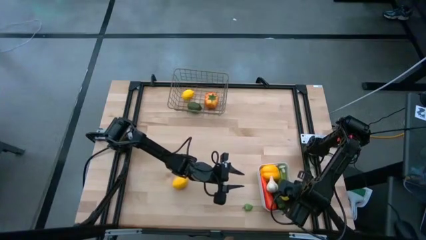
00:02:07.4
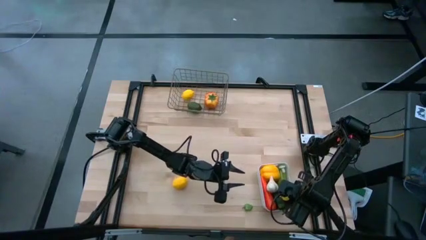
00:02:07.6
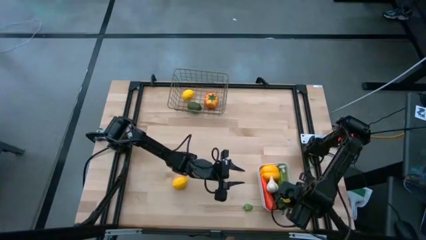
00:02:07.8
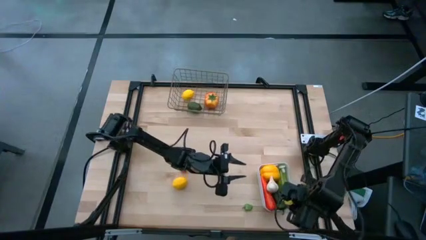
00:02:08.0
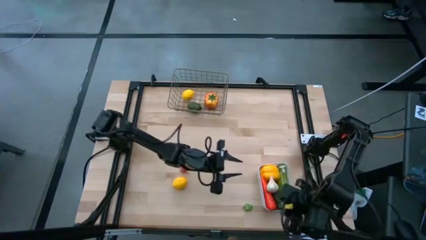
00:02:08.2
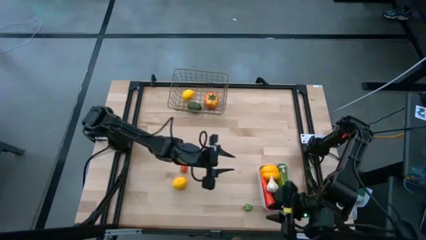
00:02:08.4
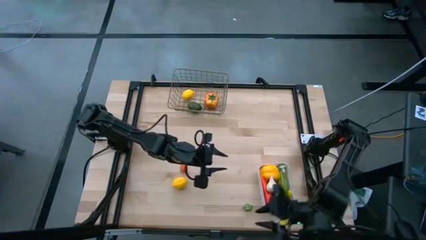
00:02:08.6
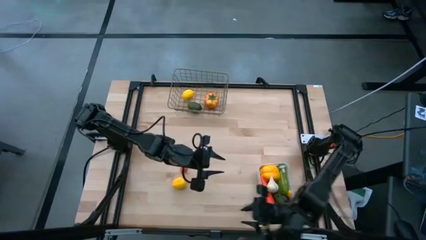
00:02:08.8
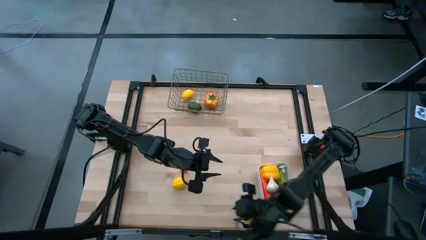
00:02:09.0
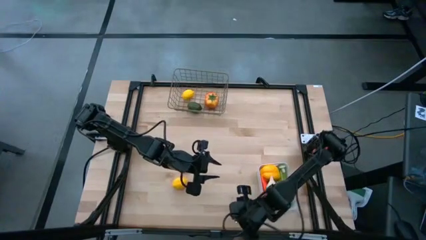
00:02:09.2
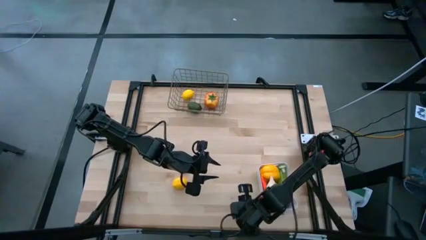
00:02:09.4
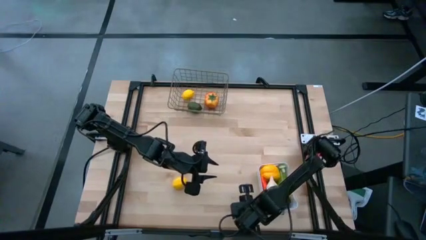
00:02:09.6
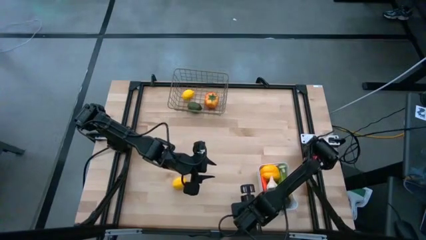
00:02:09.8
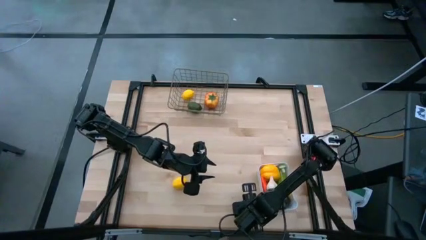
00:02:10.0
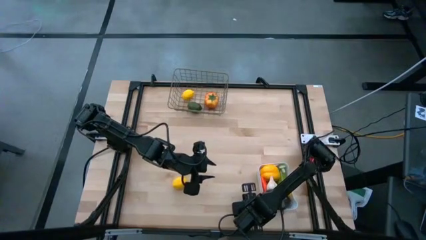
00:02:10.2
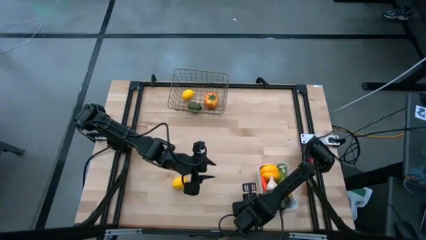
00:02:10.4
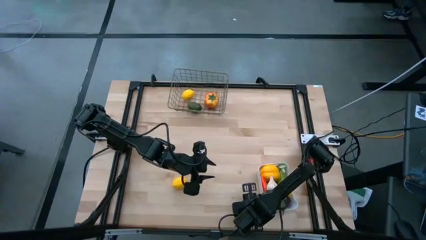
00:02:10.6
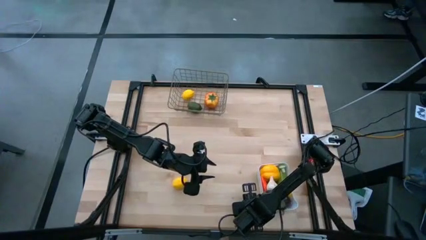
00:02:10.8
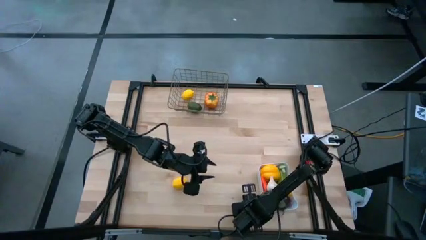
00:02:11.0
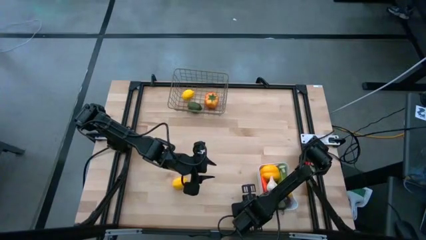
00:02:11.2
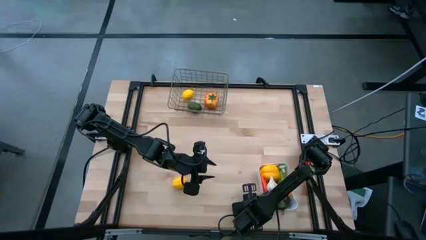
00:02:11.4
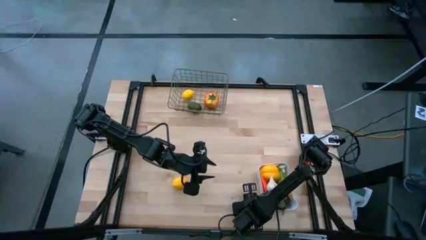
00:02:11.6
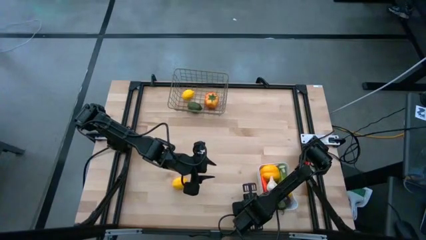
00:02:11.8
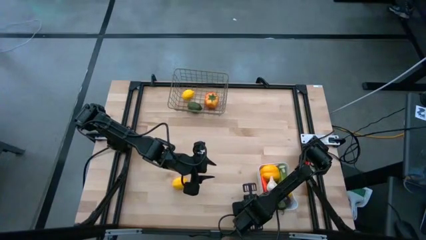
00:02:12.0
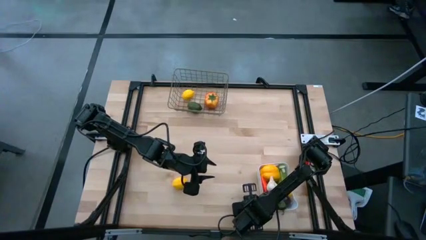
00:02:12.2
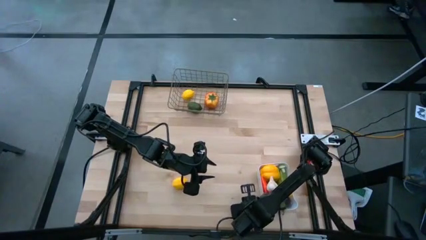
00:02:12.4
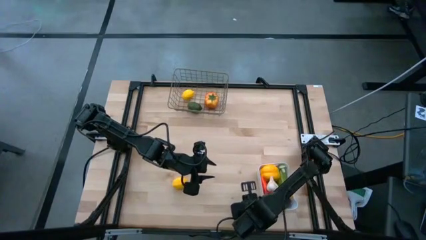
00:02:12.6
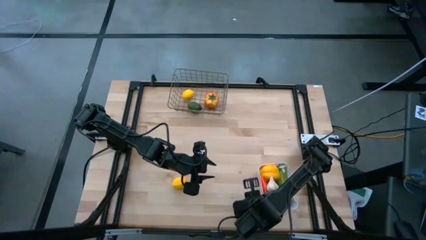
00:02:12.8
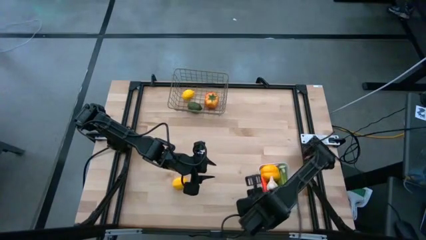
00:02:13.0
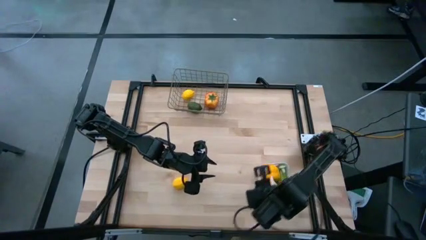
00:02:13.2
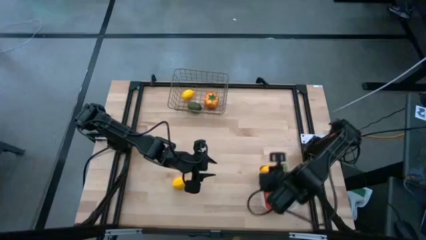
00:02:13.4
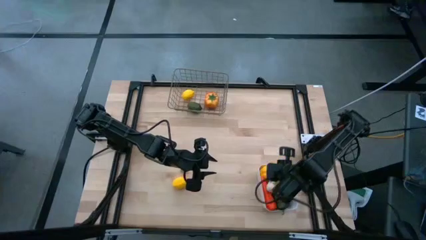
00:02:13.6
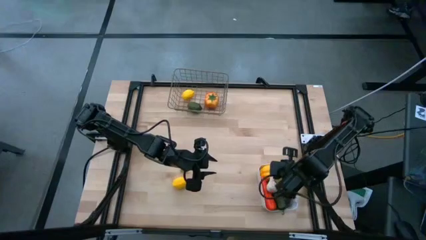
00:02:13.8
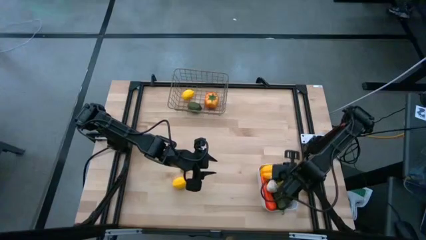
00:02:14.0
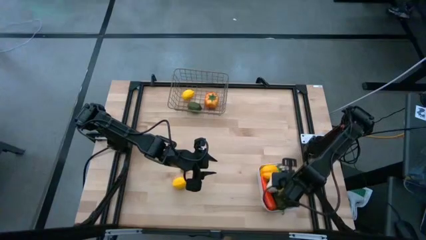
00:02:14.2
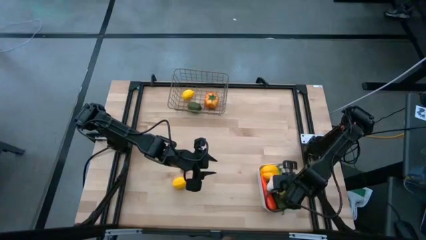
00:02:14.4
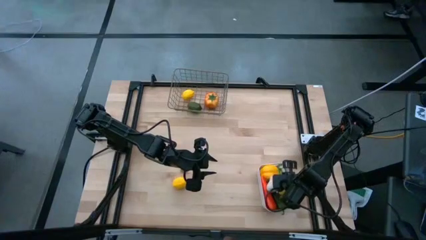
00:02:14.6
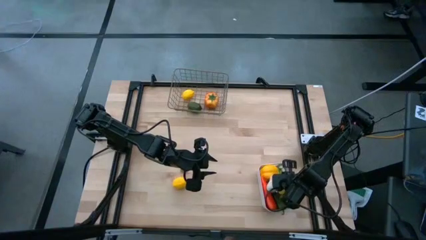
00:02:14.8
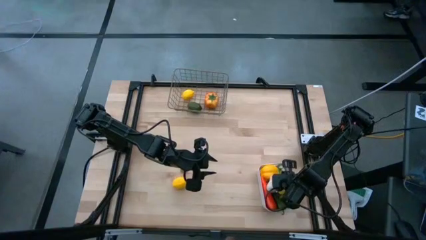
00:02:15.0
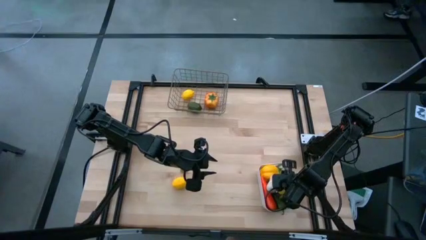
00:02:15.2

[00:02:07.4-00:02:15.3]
Task: Sort produce into baskets
Put the green bell pepper into the white bin

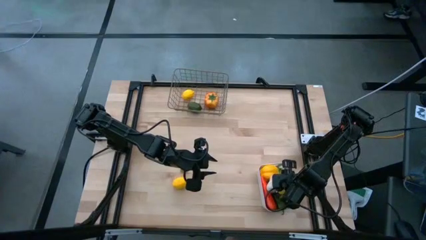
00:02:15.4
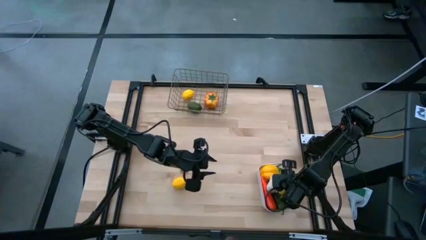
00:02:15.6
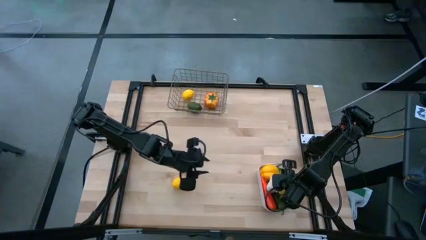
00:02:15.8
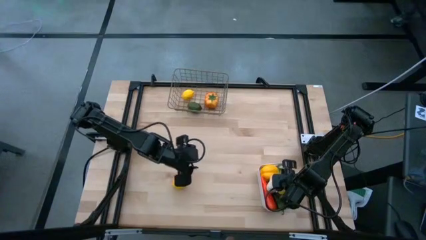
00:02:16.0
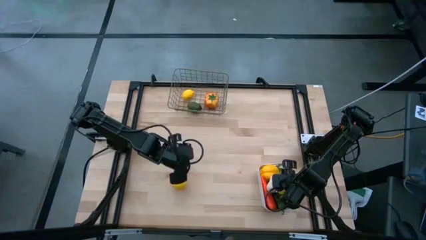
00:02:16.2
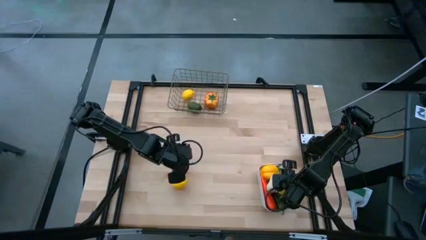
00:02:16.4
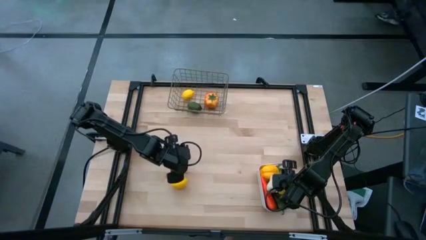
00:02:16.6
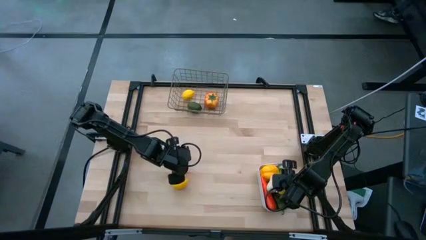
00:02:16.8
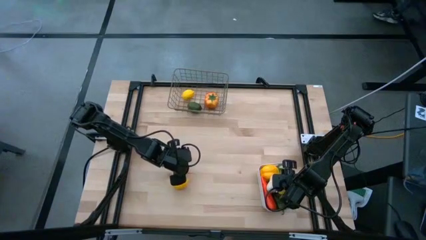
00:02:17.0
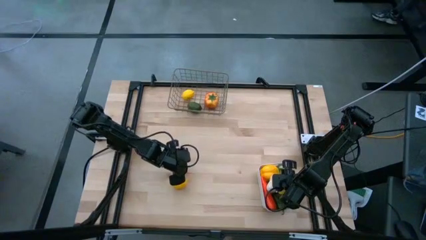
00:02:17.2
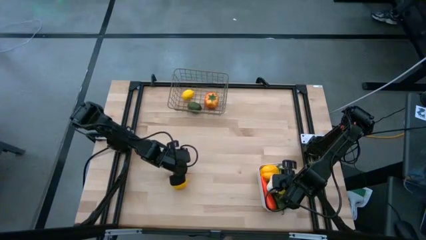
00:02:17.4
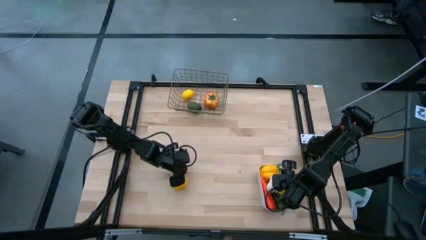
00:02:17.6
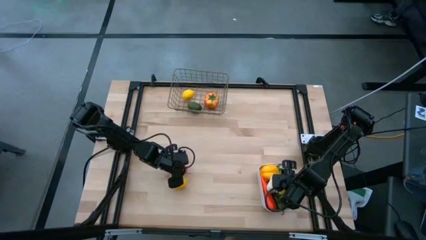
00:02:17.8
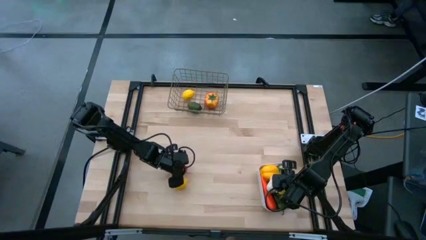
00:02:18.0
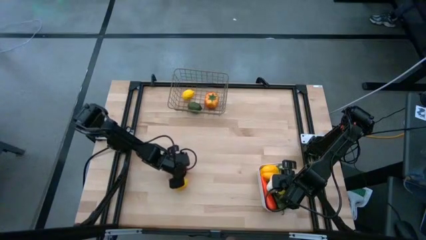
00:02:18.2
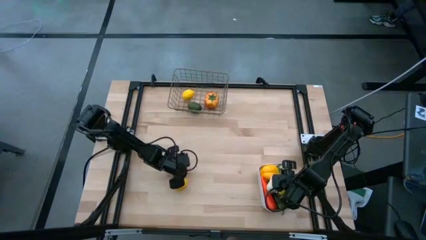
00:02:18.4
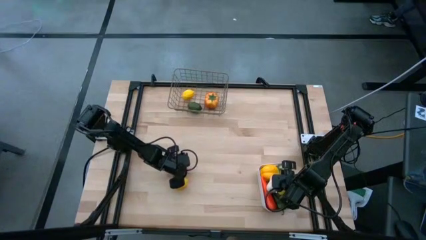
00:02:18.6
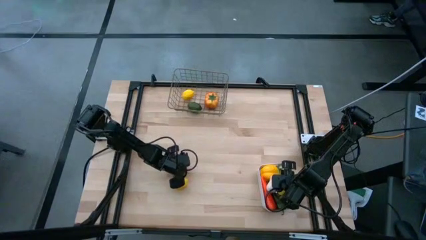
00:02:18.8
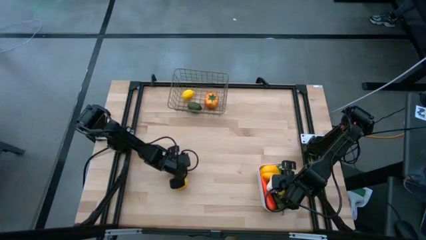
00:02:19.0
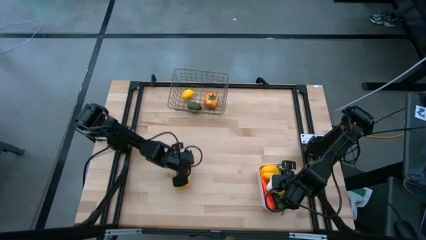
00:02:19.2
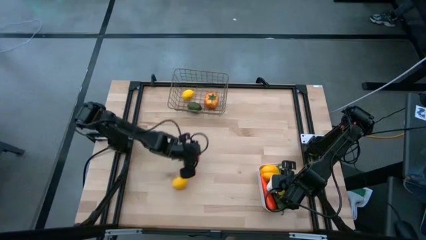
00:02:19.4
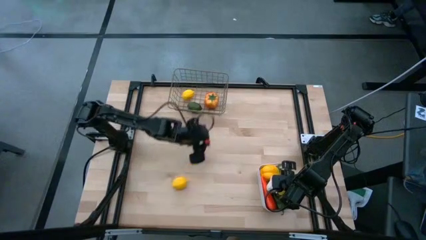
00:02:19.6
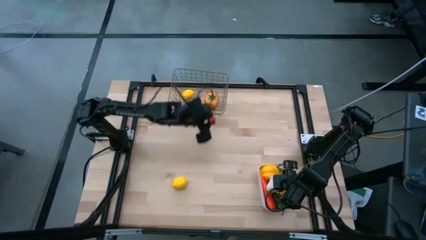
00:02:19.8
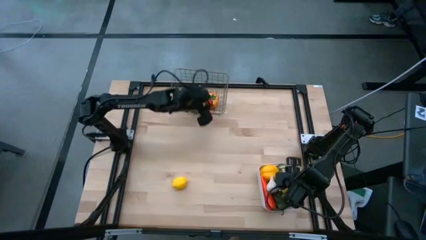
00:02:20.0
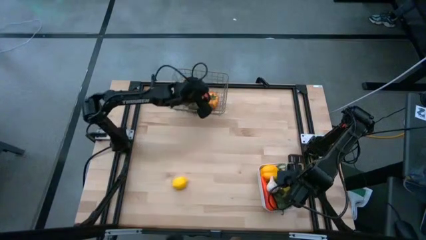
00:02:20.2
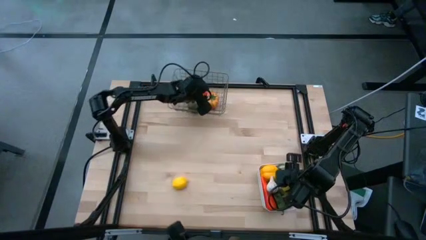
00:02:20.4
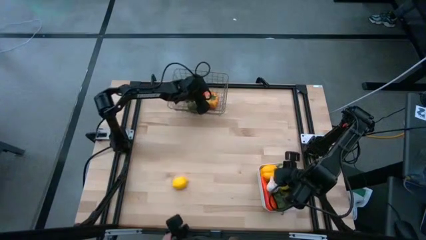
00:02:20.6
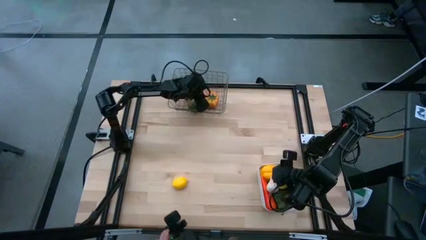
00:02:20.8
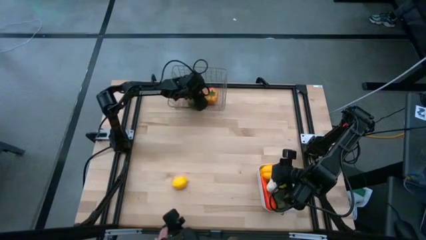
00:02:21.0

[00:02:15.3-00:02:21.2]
Put the cherry tomato into the mesh basket

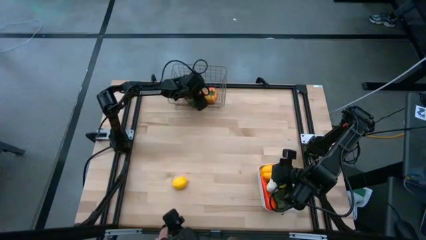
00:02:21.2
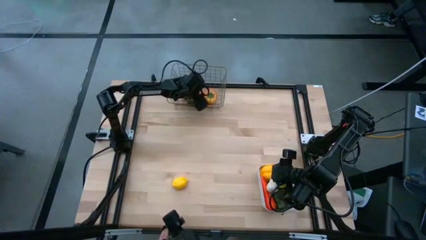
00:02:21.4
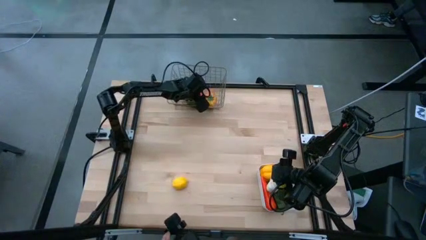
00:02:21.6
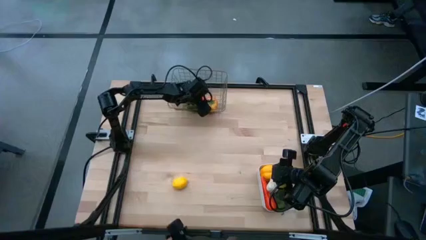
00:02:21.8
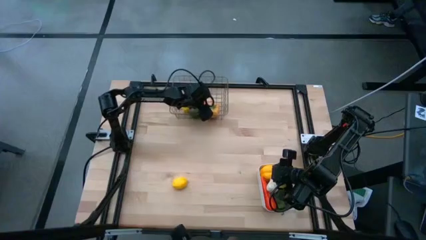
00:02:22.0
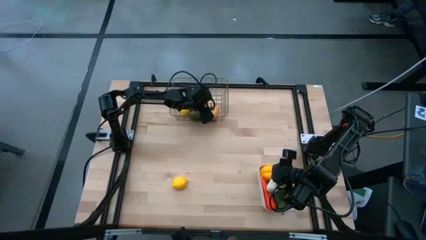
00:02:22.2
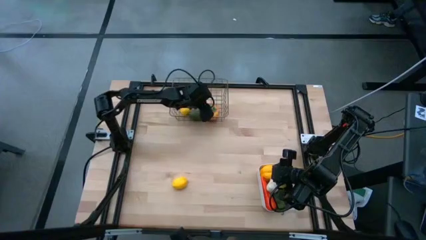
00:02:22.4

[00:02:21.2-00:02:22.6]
Adjust the mesh basket
